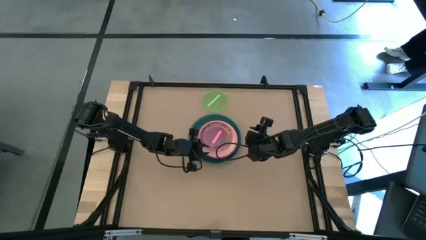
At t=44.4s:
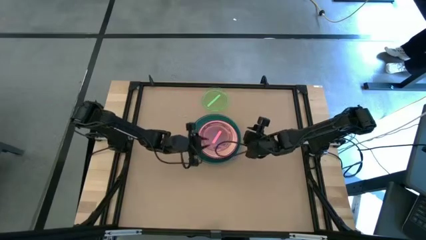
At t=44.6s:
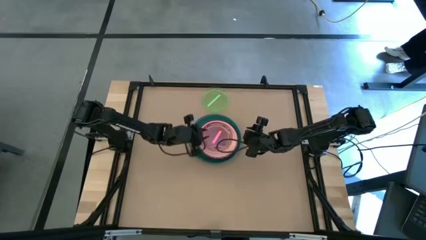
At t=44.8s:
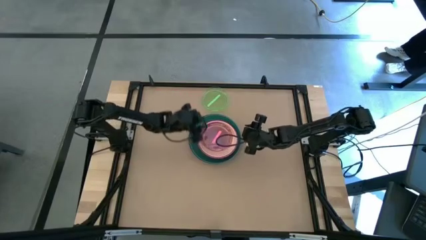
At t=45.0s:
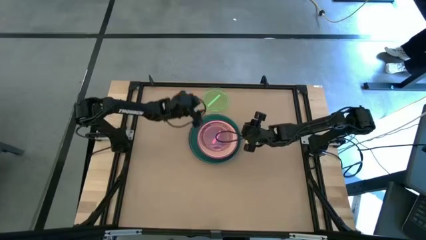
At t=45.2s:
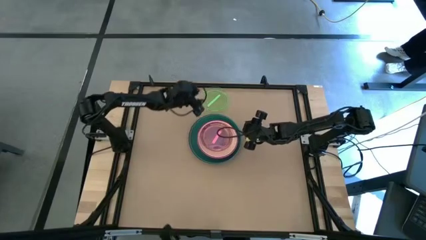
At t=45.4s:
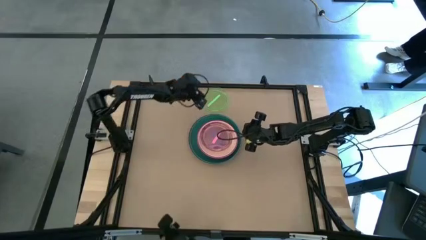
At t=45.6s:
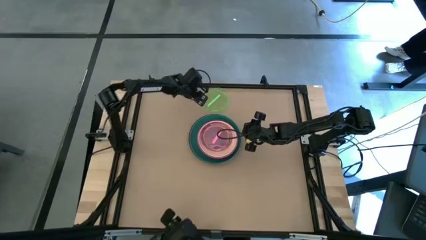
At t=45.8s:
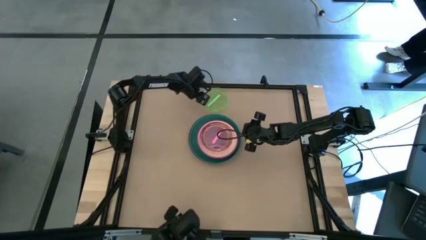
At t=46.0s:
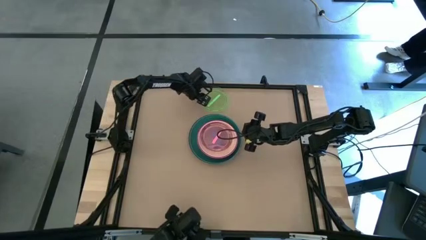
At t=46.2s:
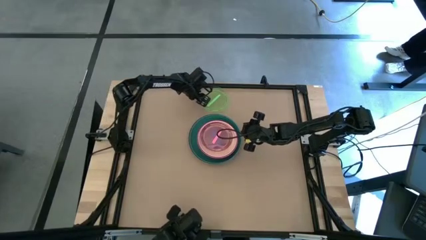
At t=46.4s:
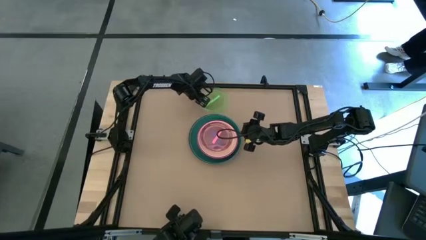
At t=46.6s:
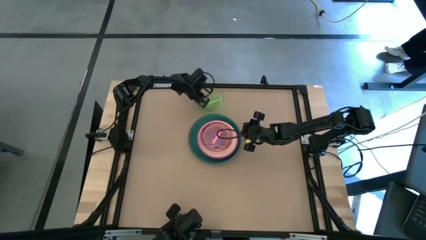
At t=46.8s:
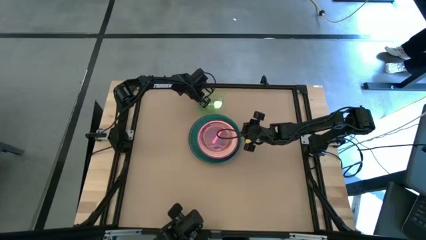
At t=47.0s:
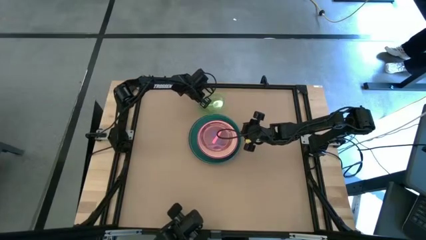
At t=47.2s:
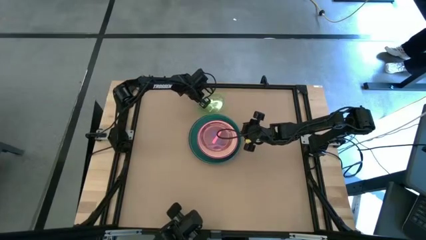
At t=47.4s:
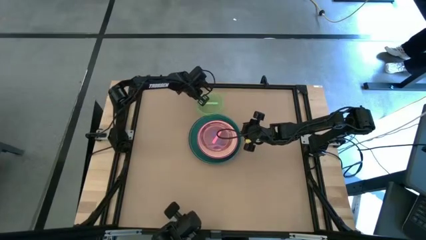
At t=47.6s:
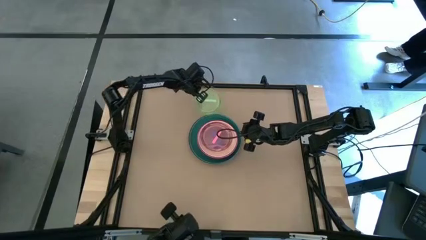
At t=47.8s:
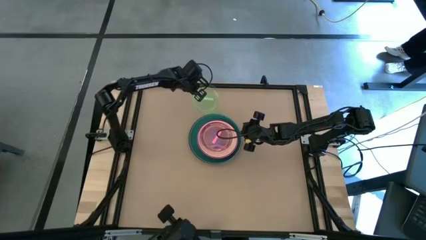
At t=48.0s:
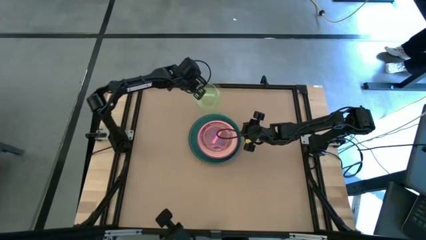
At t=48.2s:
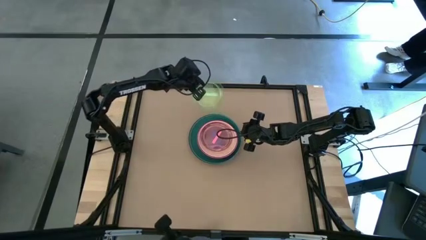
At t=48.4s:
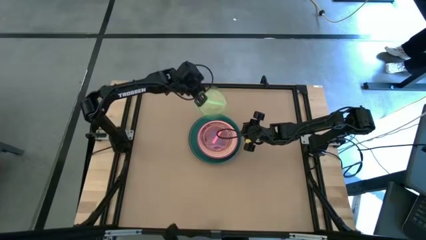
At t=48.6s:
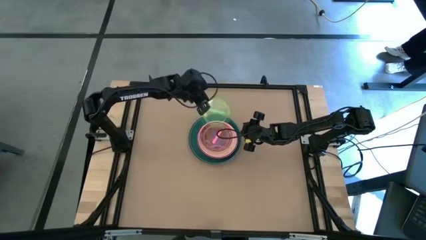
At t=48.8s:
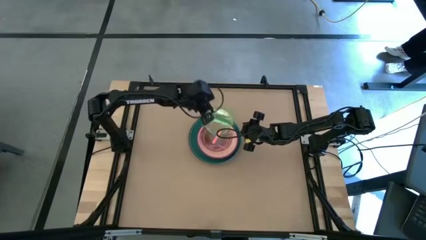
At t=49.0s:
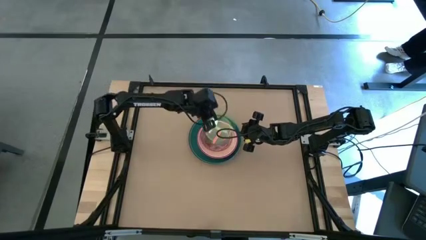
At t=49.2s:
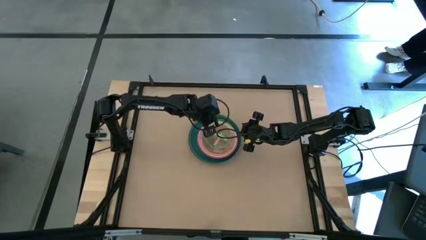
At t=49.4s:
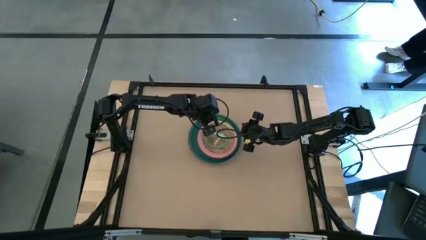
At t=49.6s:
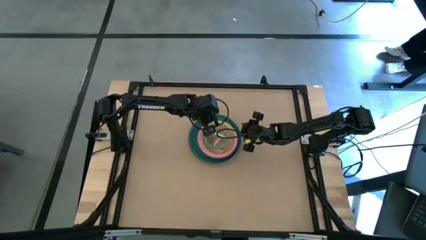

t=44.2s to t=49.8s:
Task: Stack plastic plates
Stack the transparent green plate on top of the transparent pink plate

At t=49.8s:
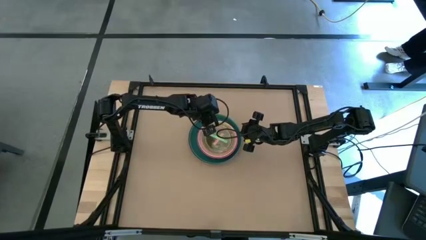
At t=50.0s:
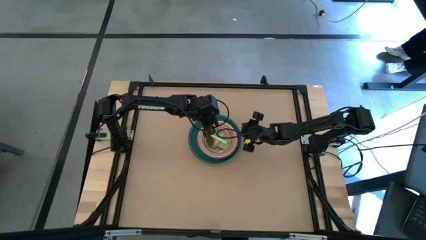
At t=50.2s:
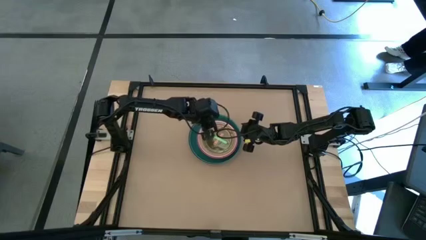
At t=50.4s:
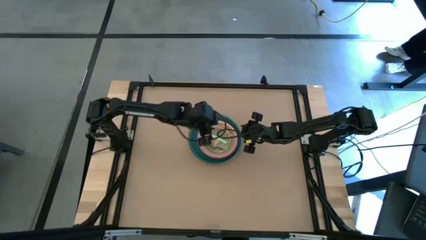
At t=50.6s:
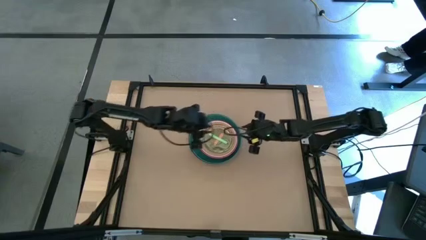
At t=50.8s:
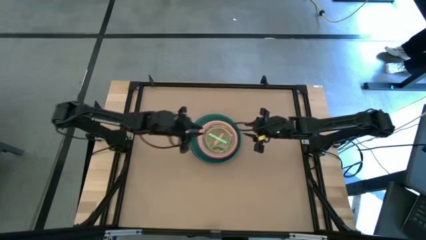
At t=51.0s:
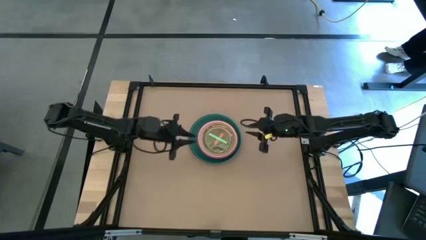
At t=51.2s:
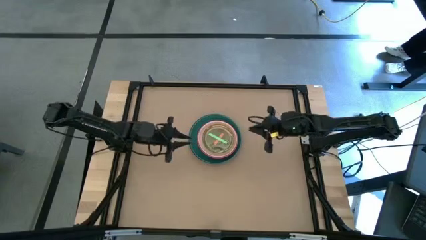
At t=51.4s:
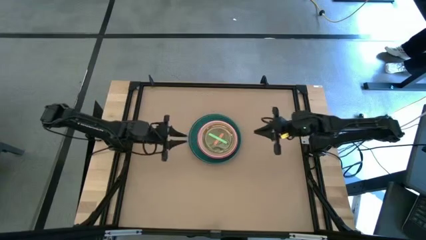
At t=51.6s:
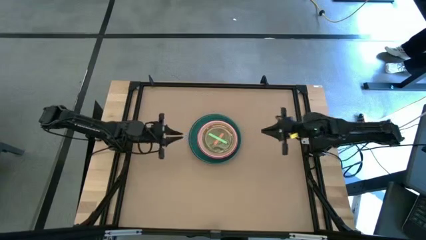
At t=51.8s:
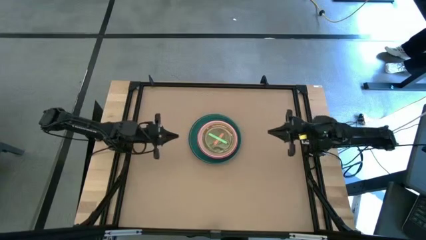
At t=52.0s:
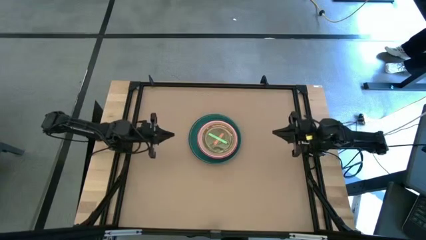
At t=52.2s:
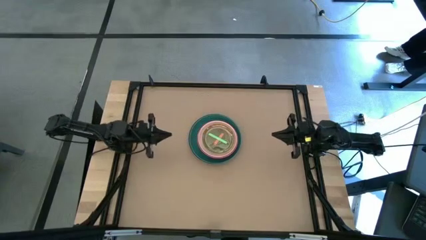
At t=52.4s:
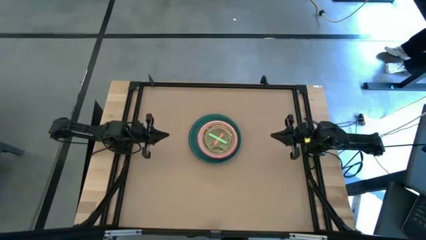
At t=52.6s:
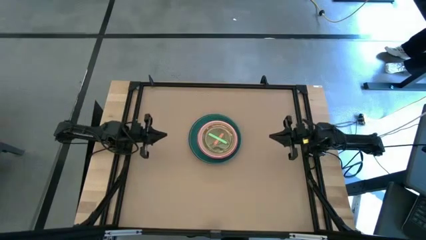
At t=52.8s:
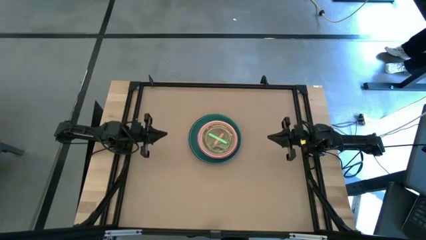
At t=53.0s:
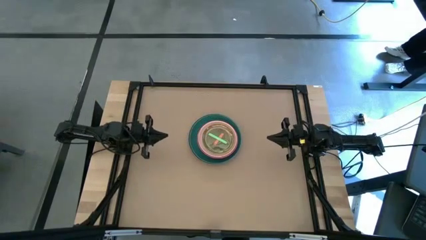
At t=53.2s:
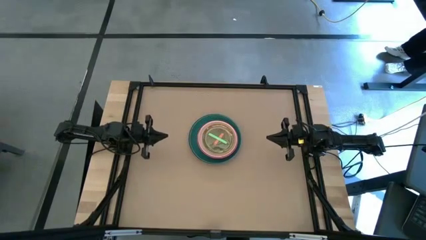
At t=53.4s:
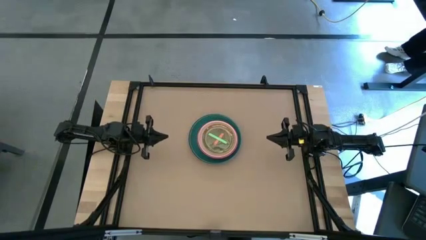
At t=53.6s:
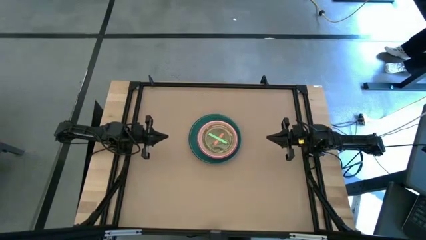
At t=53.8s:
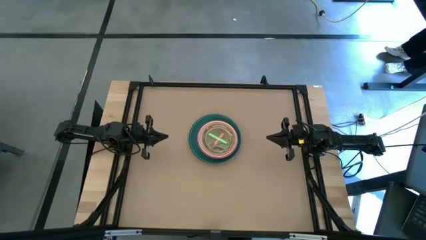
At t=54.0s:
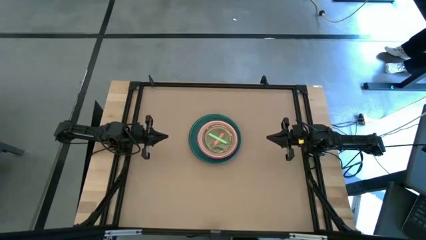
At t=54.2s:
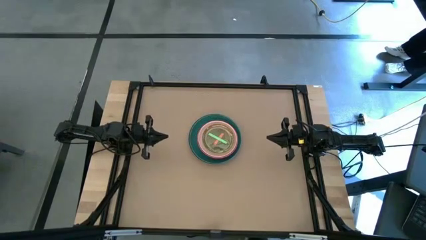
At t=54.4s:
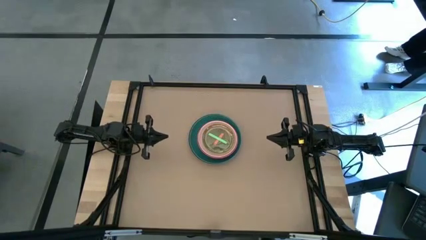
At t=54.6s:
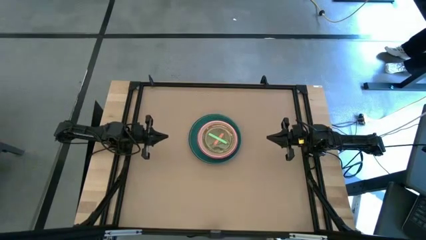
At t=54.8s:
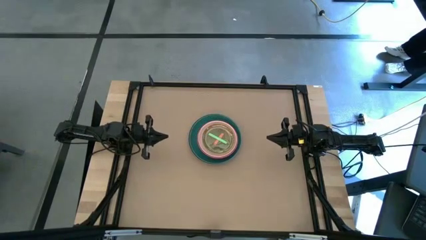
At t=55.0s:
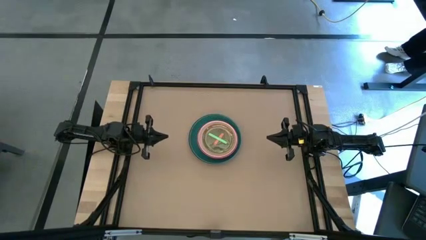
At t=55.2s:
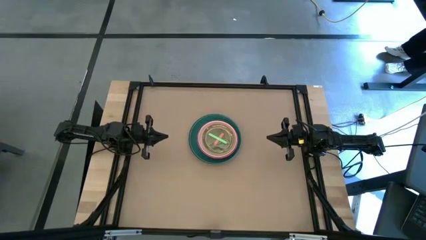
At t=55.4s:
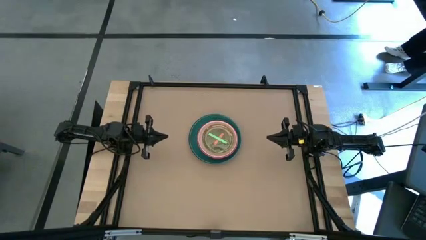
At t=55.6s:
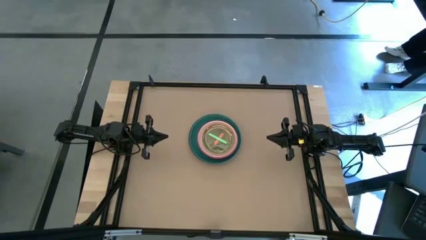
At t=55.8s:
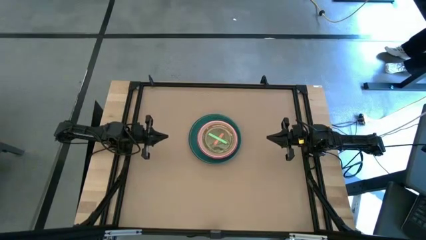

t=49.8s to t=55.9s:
Return to Home Position

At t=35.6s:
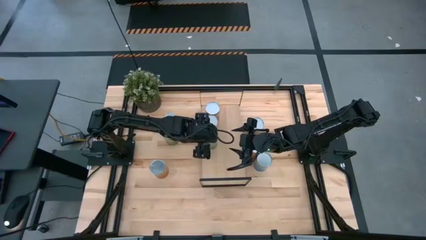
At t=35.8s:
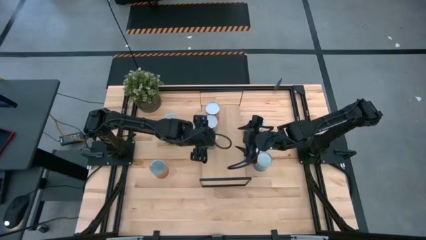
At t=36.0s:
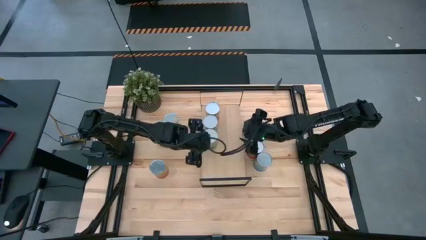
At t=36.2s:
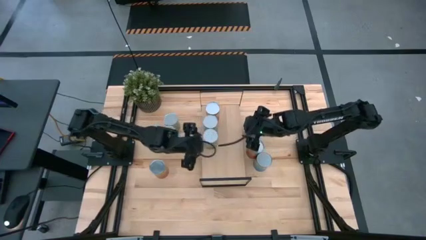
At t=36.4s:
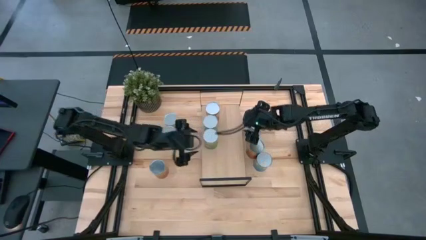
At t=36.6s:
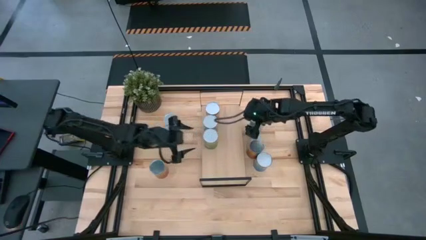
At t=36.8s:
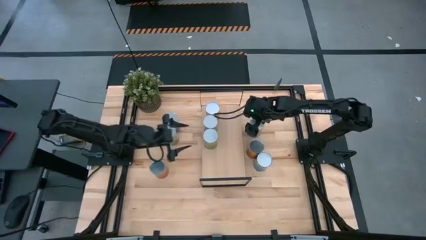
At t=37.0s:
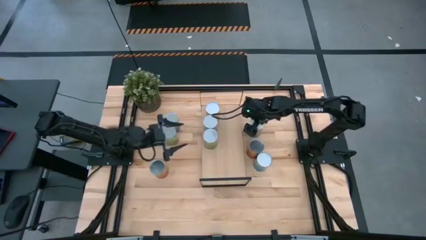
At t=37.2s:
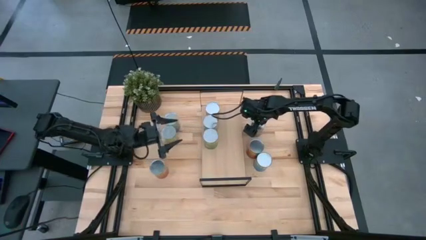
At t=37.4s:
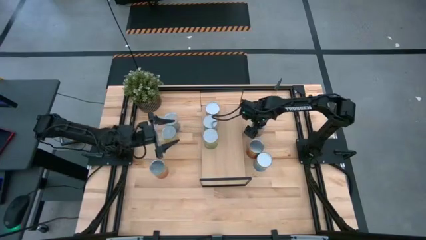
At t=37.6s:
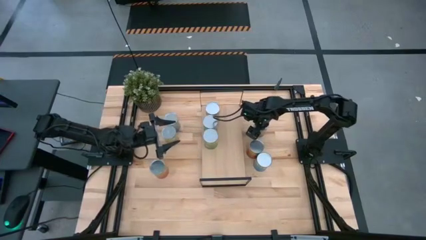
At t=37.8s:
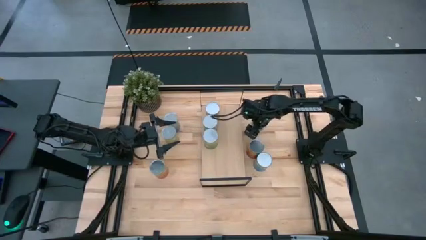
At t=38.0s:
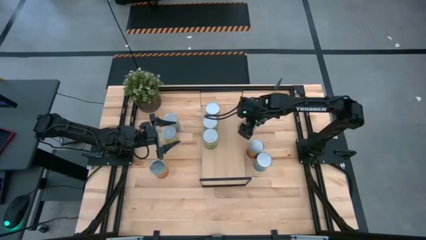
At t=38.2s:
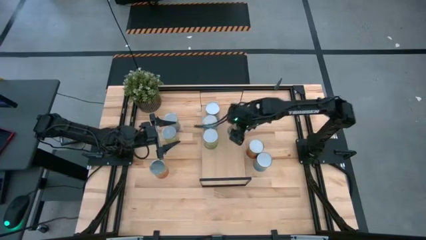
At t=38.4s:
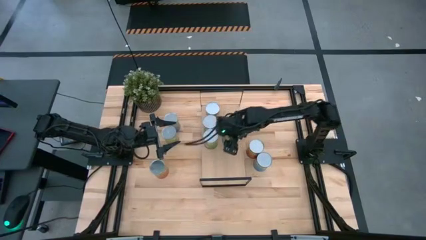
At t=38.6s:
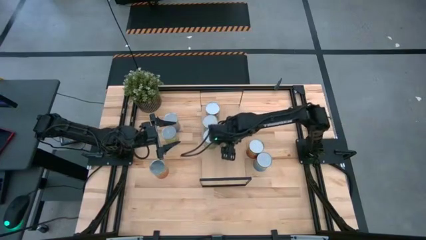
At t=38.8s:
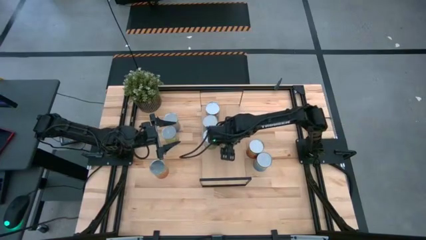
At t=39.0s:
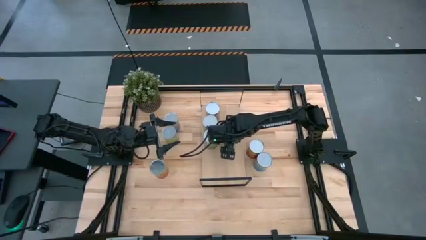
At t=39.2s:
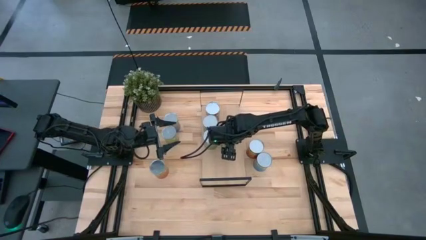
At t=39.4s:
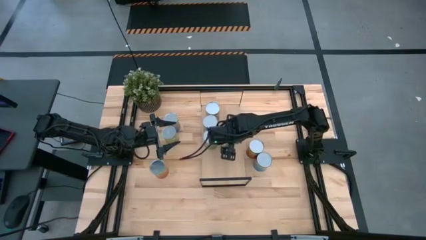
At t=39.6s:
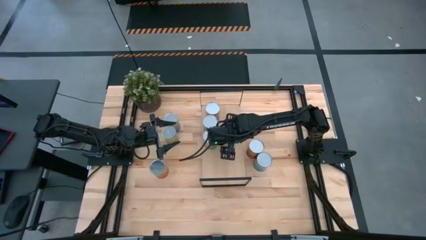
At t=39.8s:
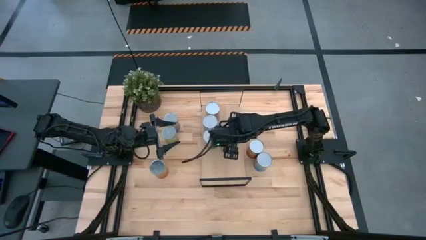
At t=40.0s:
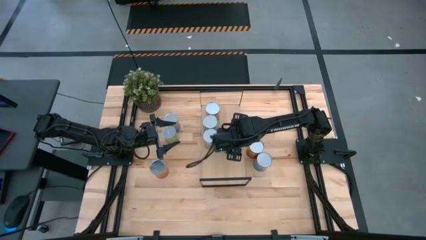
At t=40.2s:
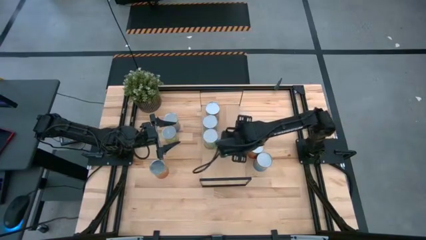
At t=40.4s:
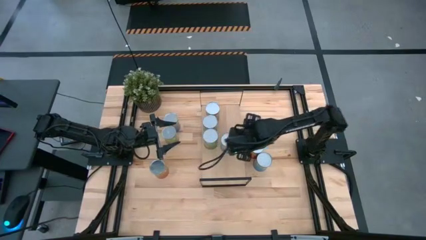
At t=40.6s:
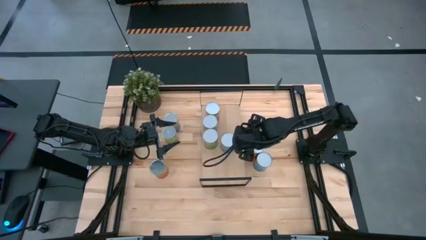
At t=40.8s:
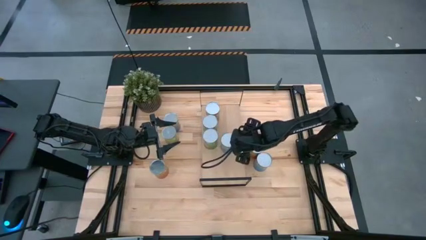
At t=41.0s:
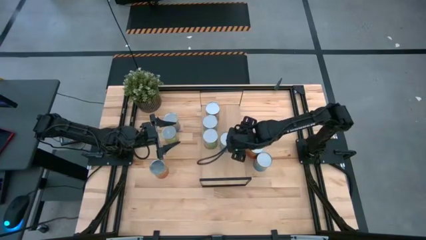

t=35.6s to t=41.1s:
Task: Pick and place cans onto a shelf
Put the canned tomatoes on the shelf
